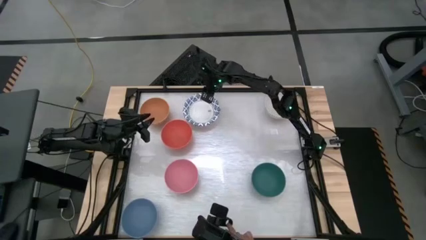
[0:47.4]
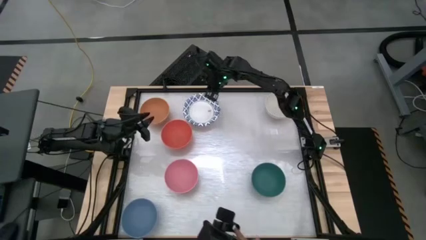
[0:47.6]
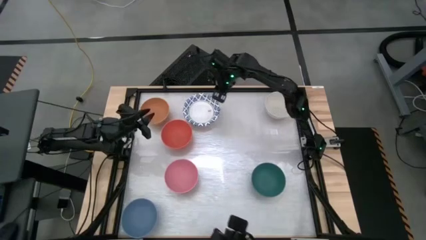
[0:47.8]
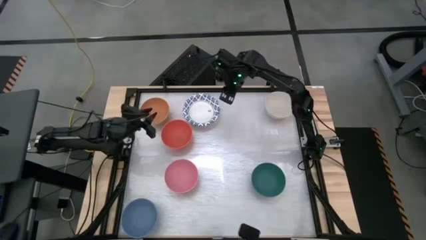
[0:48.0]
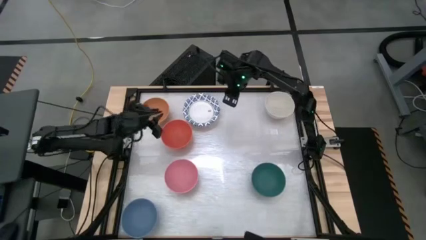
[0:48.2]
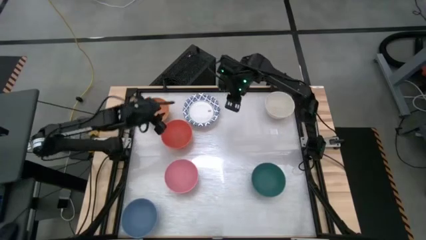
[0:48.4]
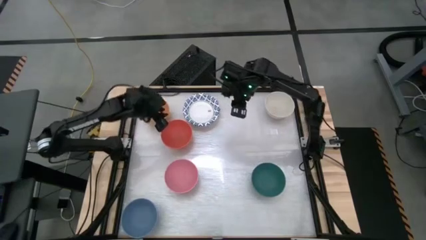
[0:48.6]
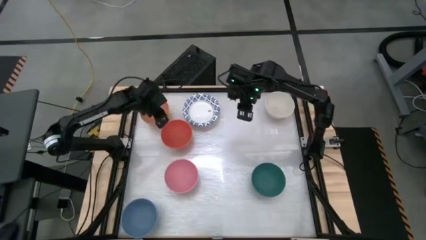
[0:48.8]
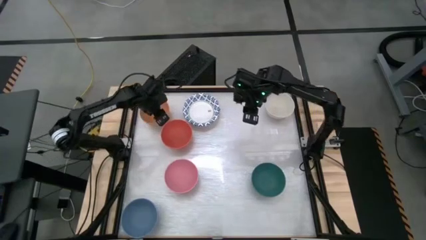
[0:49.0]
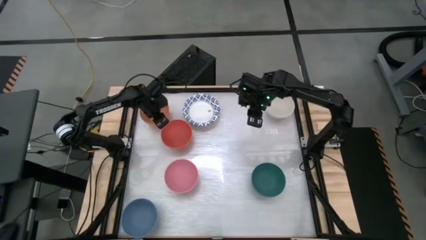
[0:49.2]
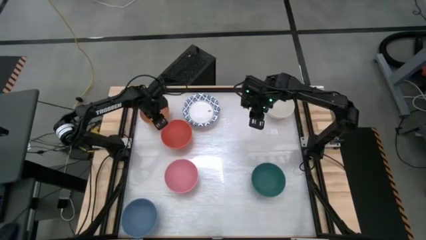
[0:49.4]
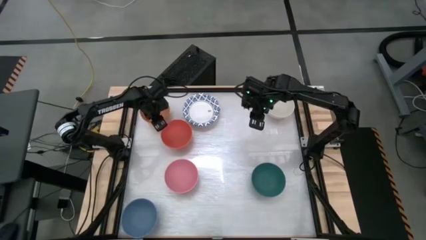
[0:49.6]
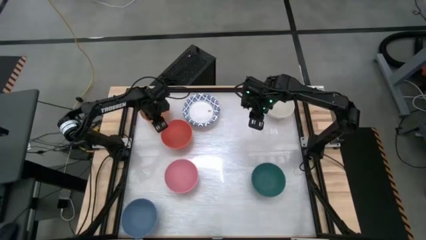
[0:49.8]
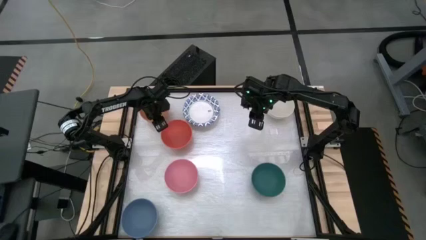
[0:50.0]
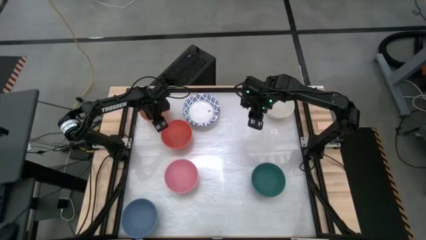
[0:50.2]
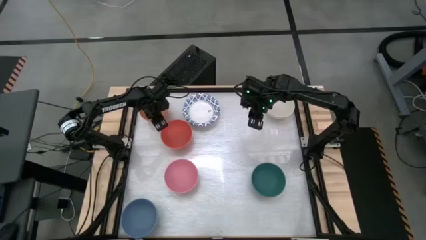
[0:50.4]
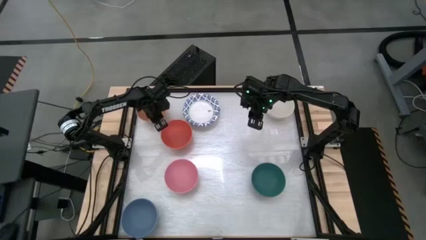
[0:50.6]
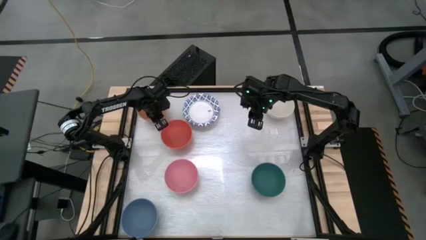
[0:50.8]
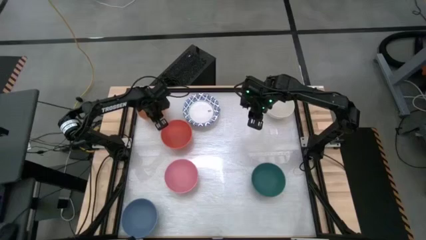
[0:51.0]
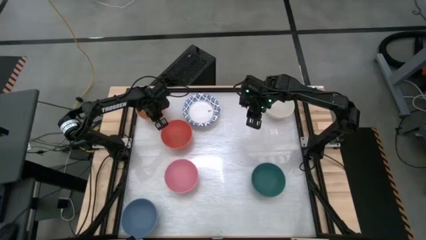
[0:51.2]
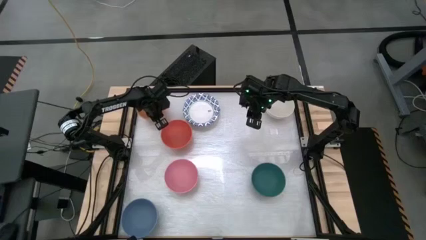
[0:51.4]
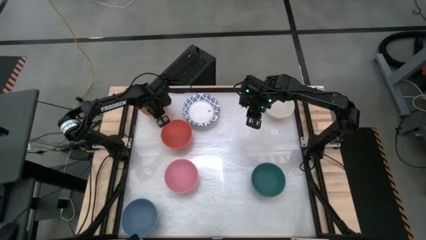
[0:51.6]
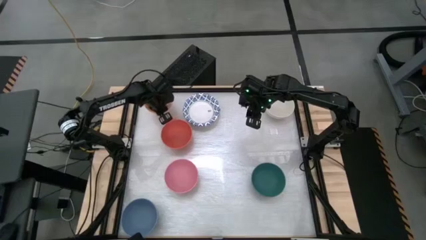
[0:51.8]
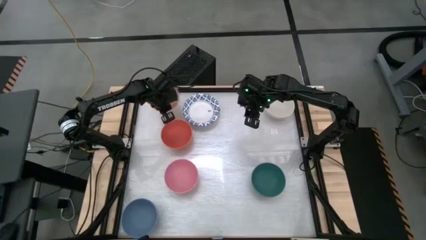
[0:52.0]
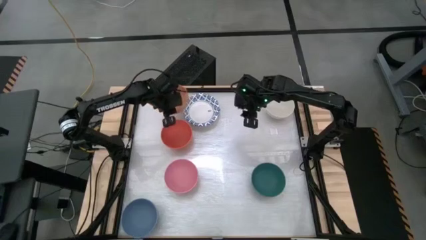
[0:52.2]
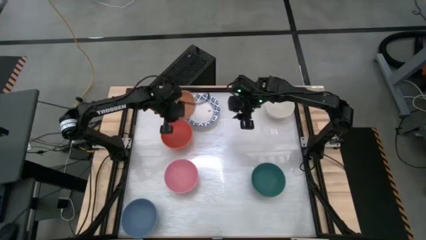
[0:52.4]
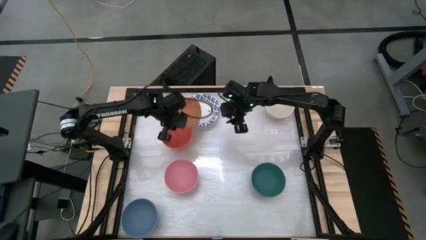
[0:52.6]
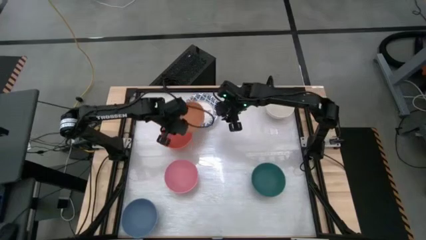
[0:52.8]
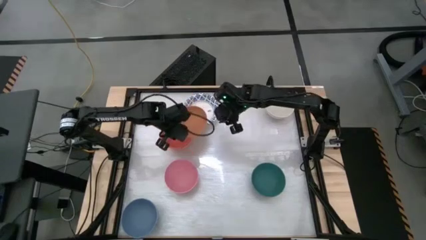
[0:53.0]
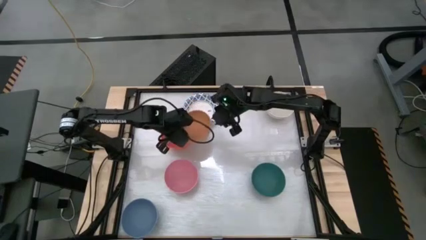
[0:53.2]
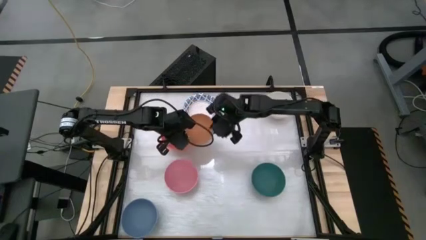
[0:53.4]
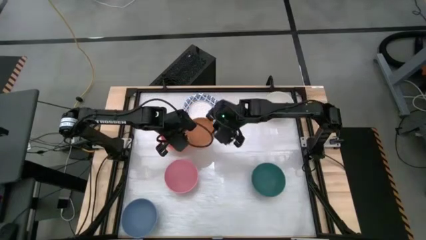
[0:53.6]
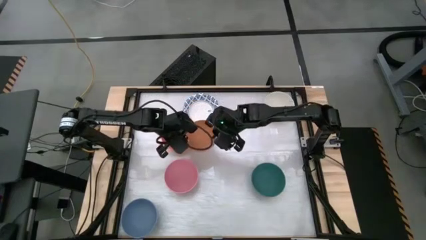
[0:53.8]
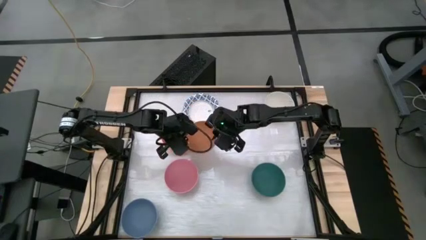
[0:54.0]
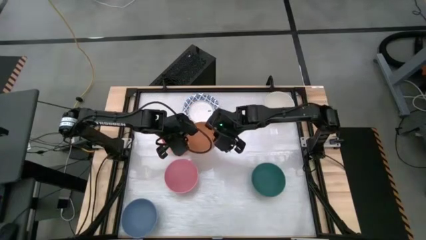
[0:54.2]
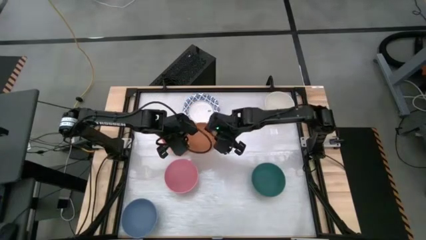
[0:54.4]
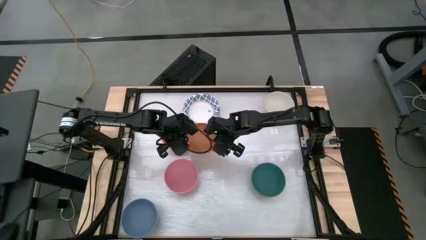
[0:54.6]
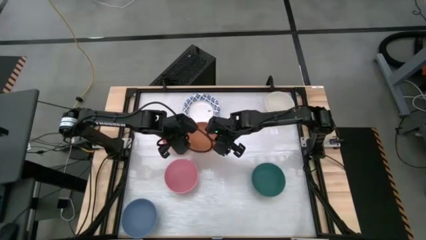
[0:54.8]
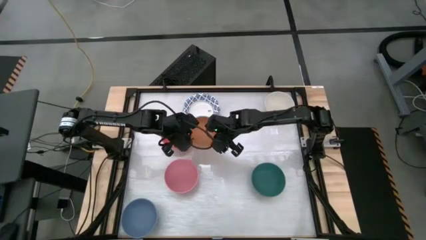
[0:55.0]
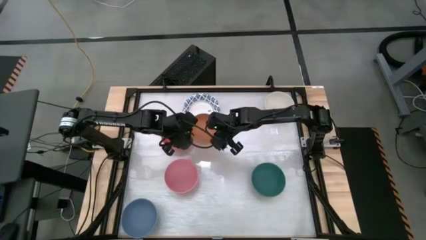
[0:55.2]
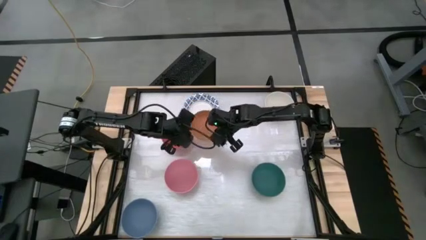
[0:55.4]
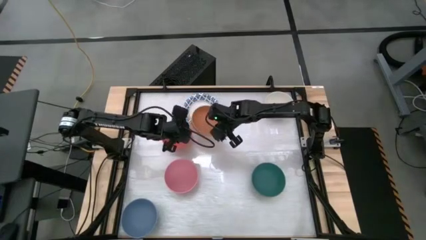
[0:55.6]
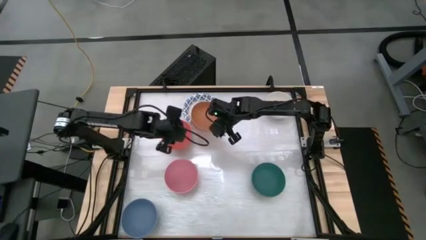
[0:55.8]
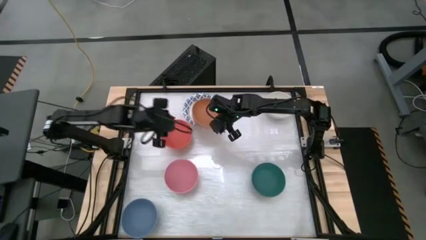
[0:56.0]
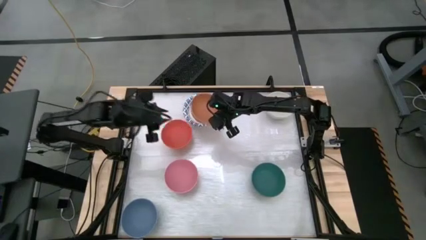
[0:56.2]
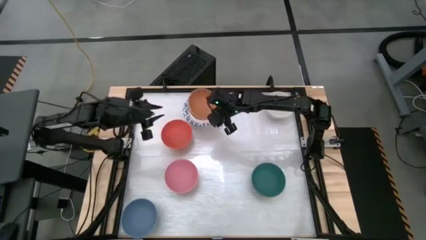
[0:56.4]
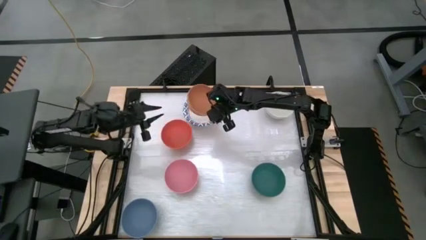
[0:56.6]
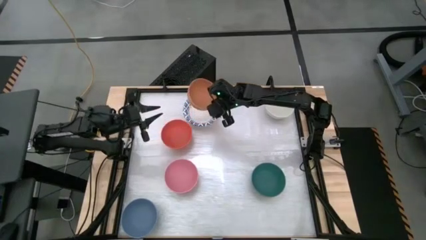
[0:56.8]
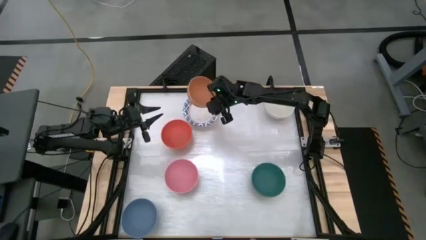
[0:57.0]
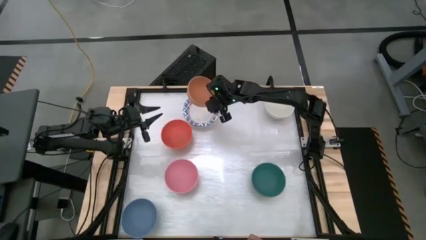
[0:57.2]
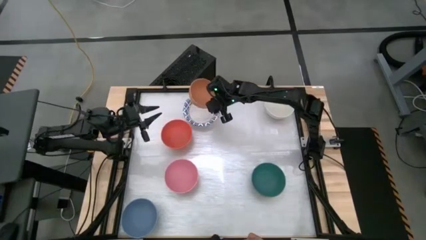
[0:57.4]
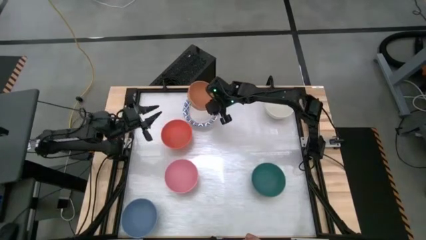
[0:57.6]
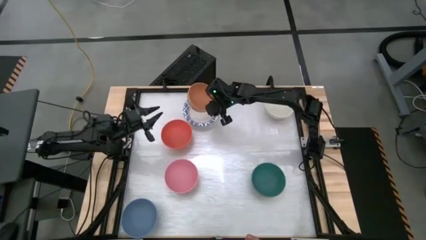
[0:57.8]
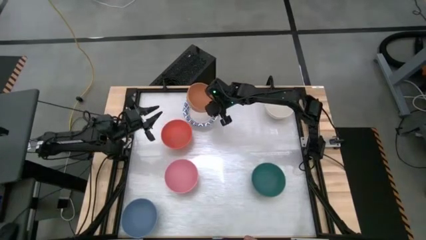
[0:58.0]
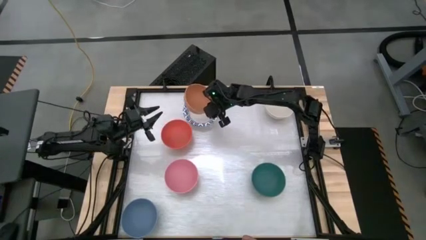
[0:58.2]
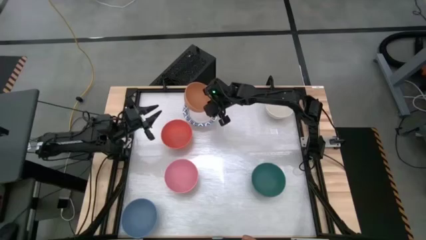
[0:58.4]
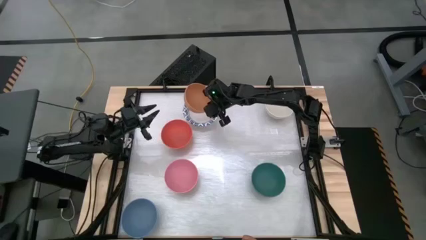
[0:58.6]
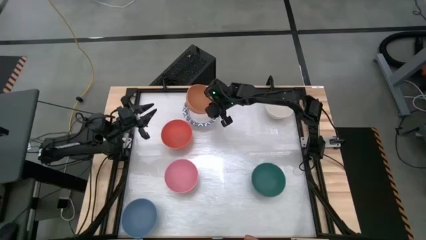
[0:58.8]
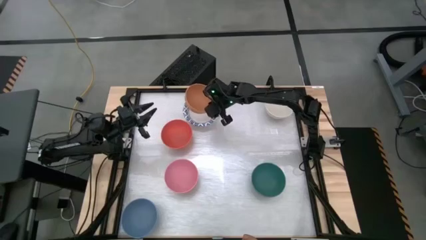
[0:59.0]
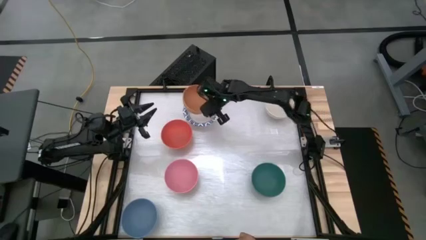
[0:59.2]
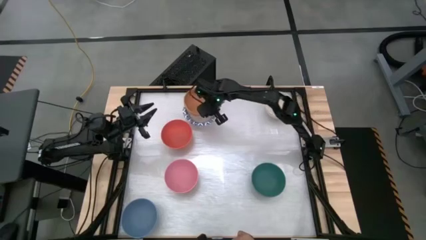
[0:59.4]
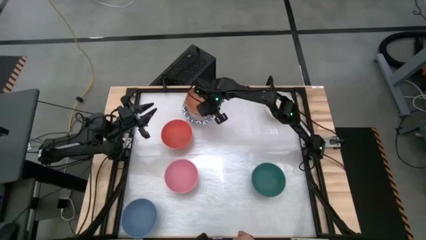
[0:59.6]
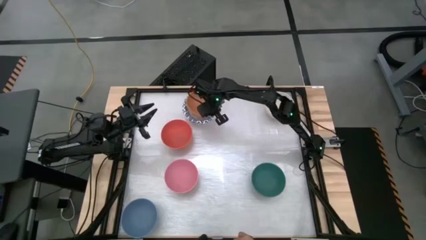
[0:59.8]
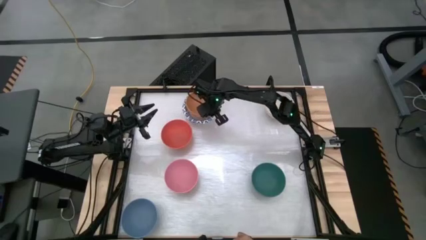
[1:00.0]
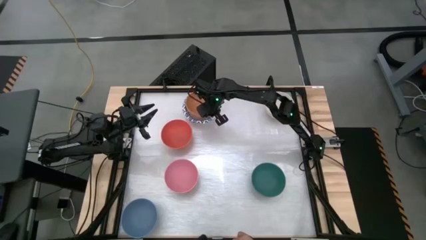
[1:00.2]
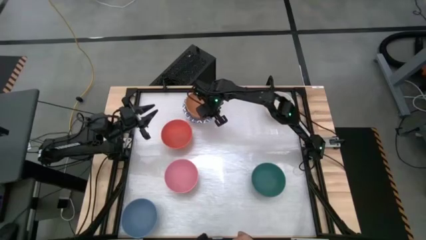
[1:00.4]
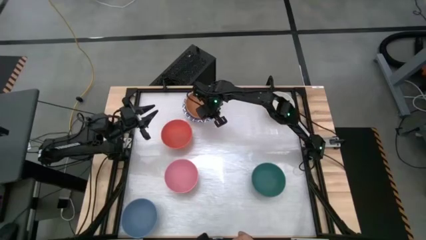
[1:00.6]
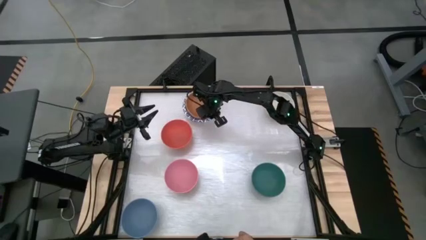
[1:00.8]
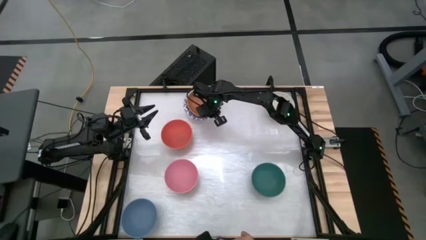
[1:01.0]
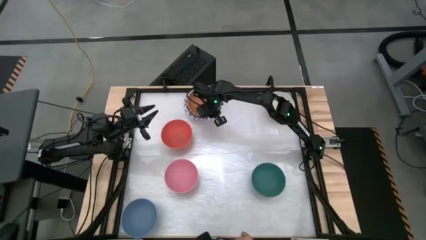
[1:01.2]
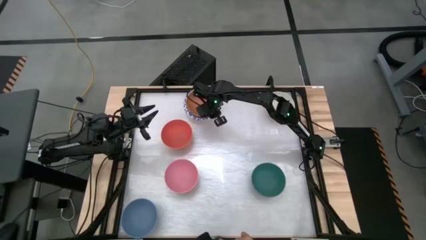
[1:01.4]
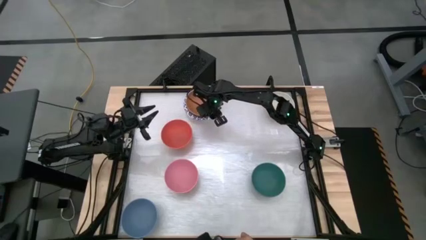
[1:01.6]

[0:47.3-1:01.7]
Stack the brown bowl onto the stack of bowls
